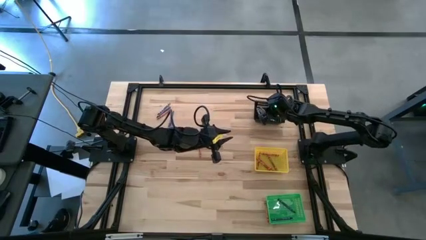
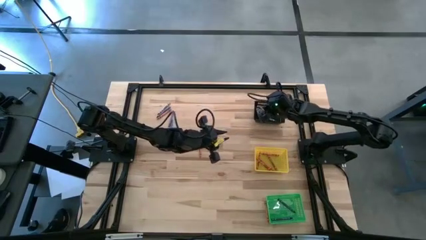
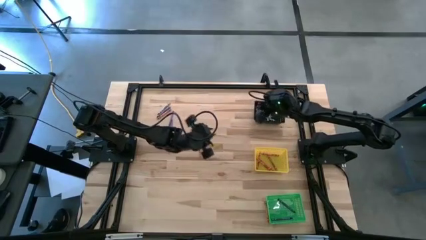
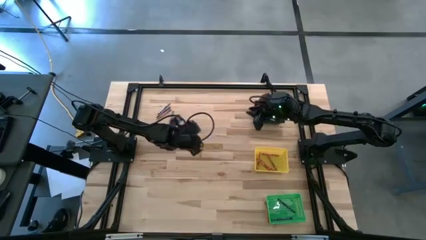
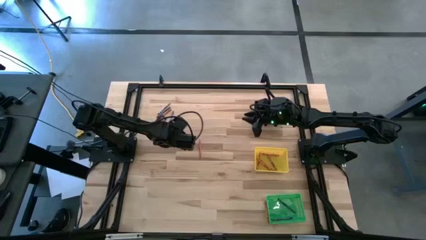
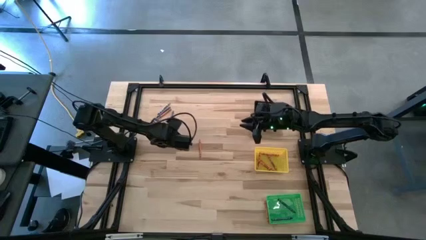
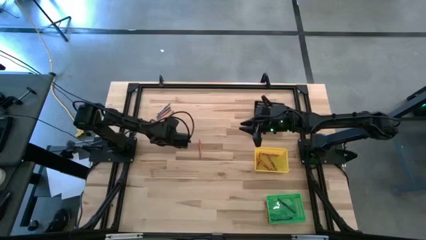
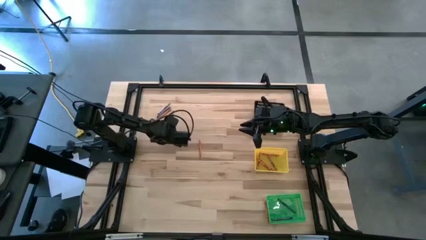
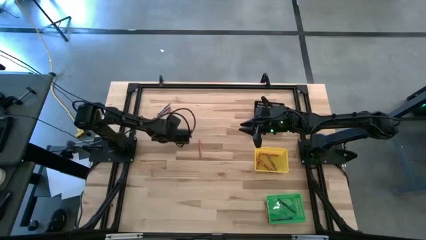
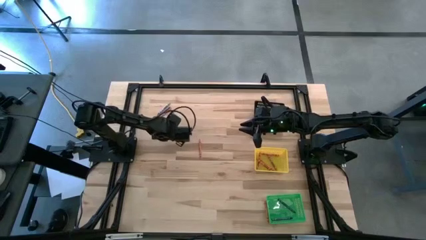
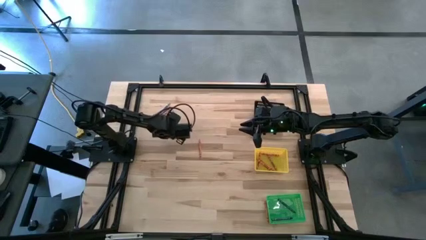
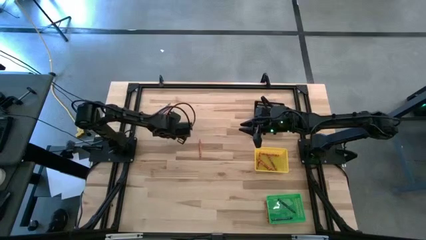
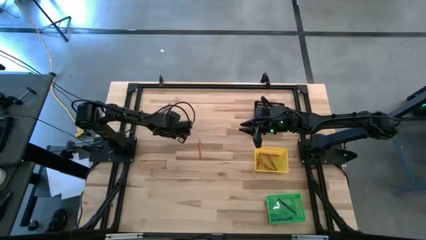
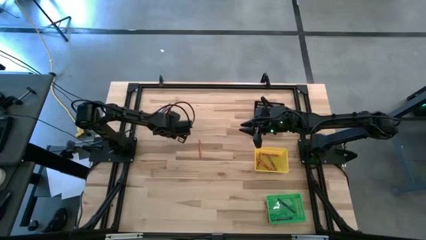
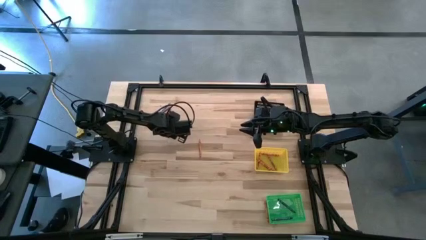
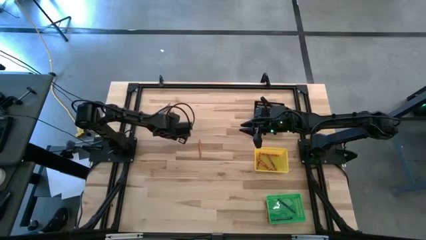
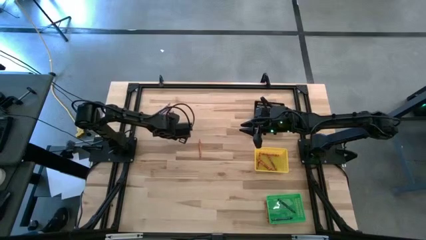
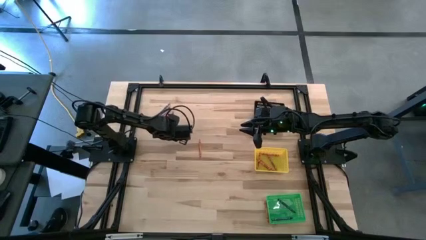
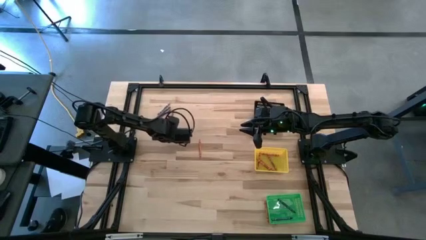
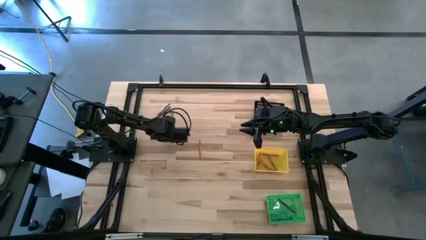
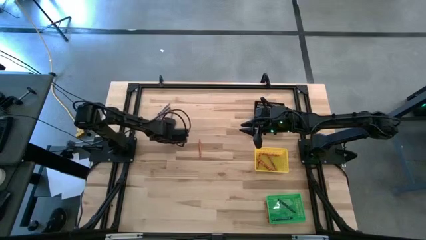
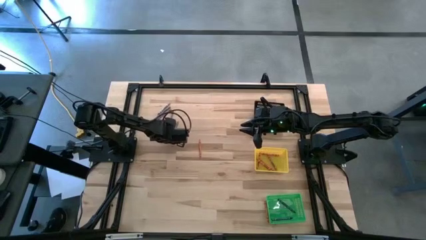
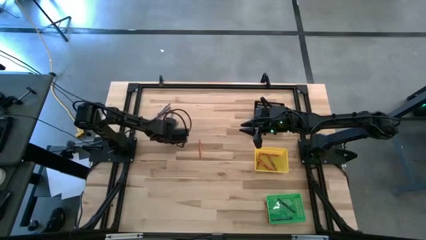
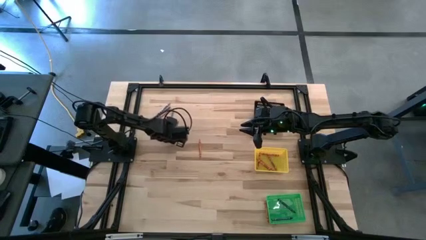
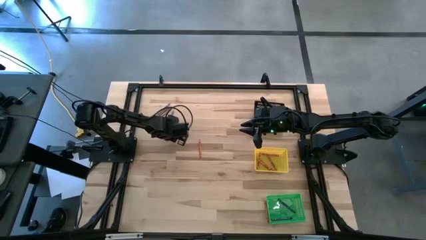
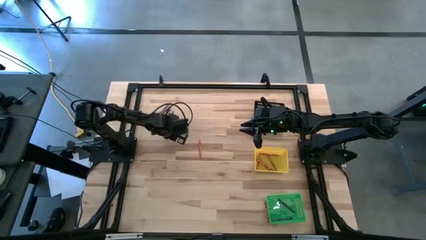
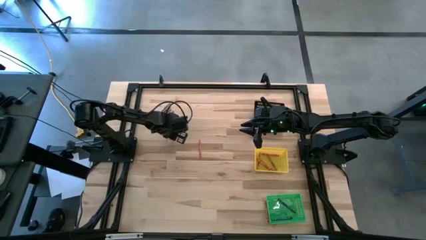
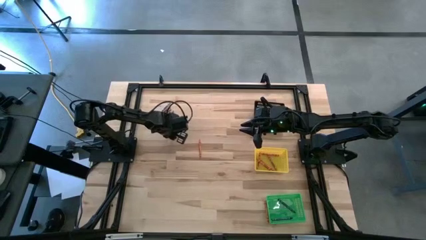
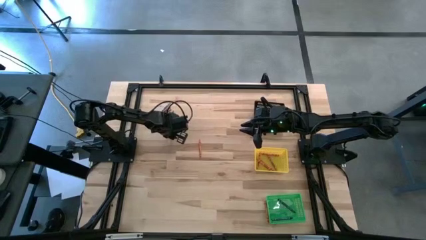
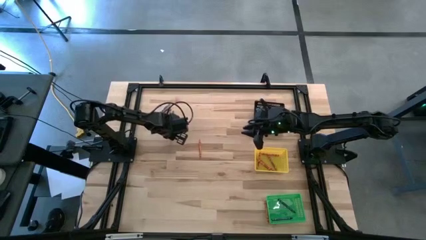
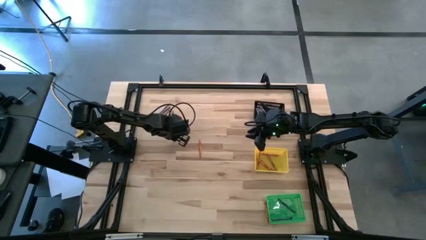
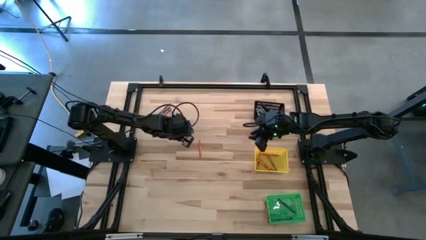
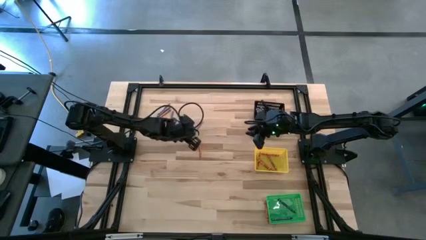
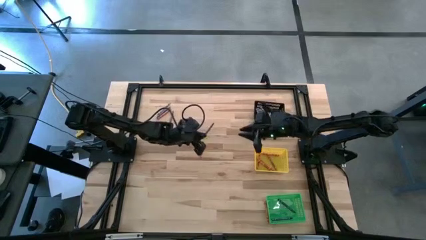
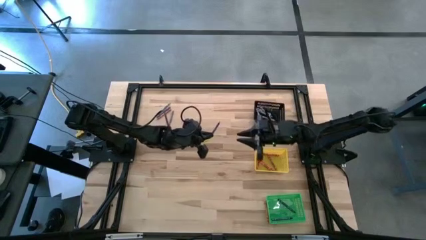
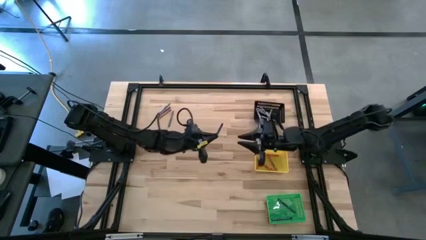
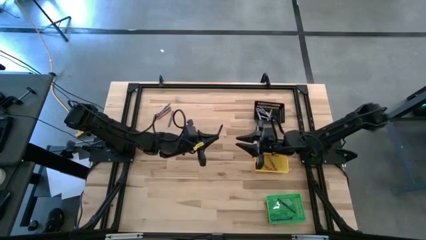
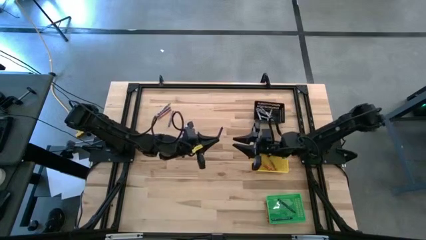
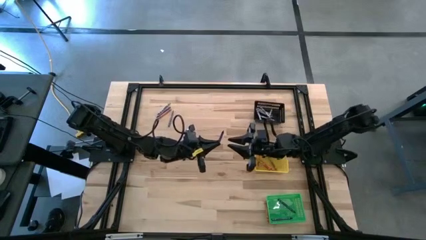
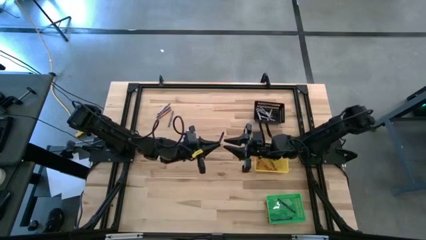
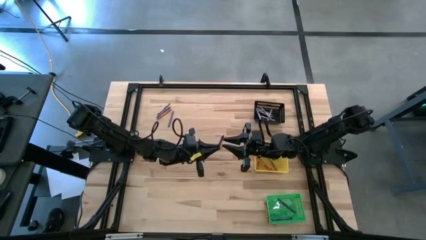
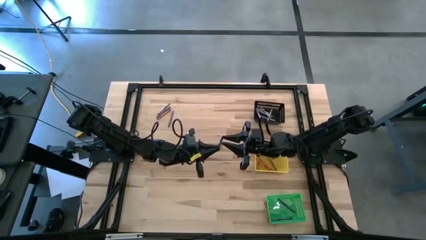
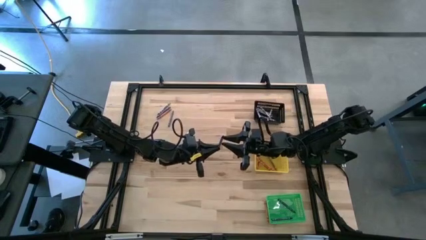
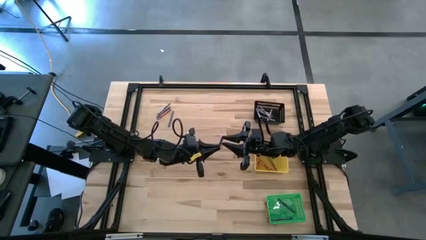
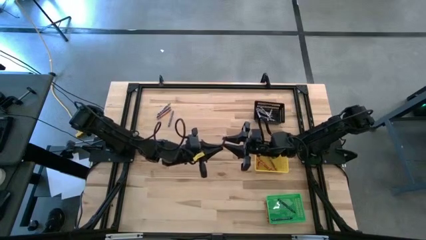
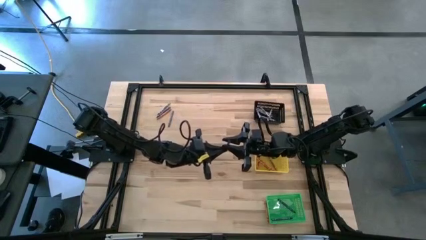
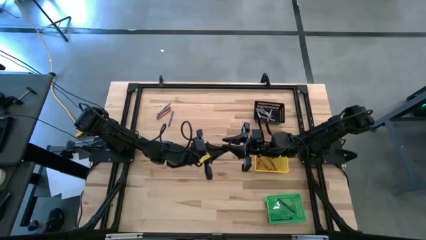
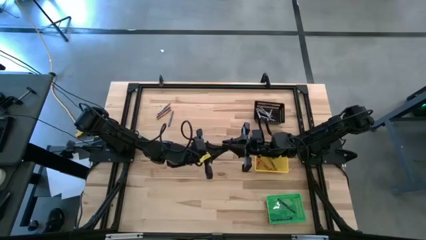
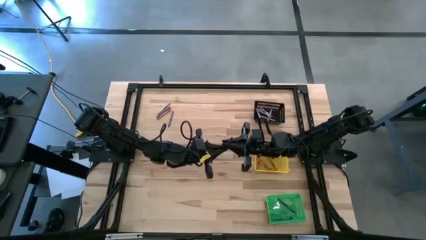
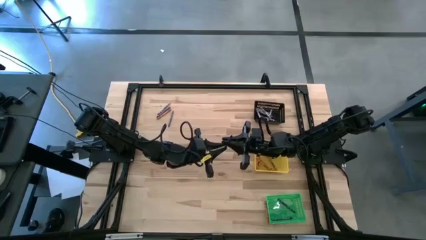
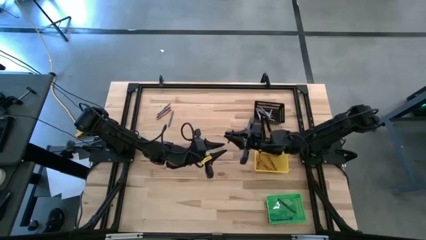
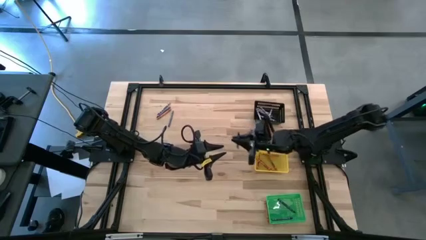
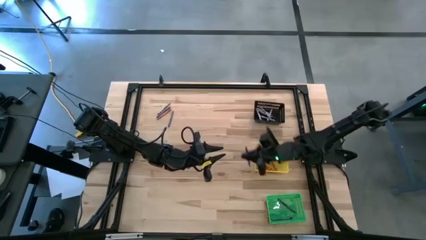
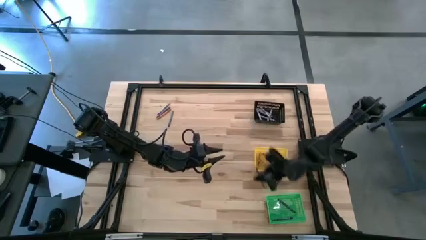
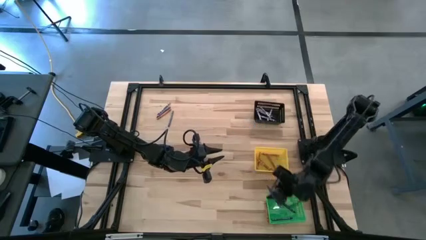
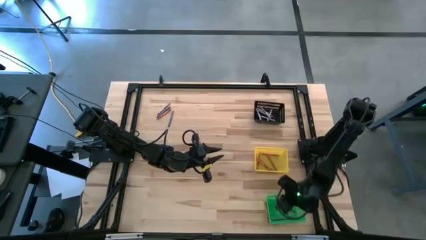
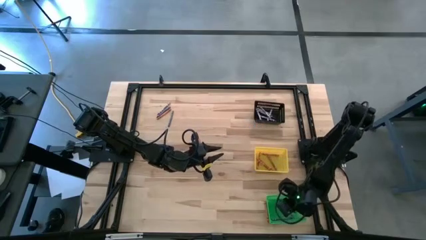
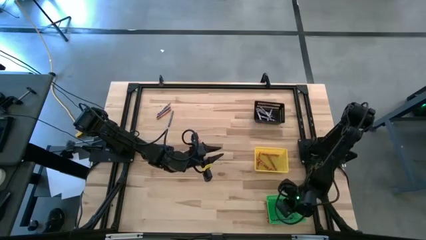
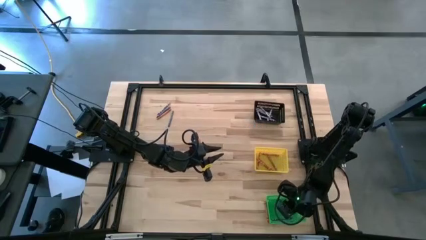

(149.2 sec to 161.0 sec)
Task: Sort crayons
Put the blue crayon into the green basket

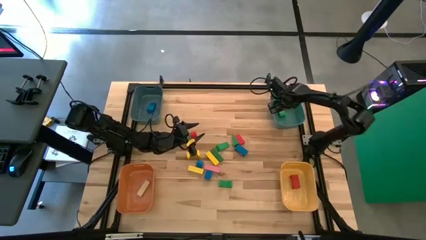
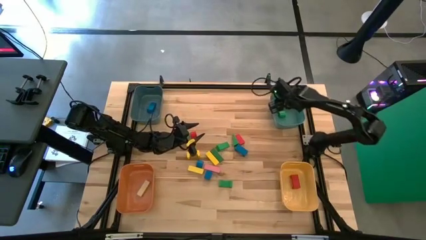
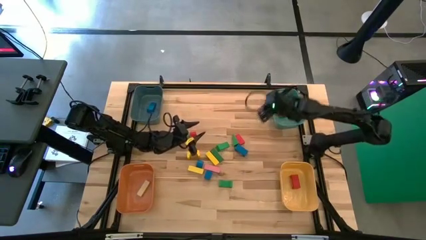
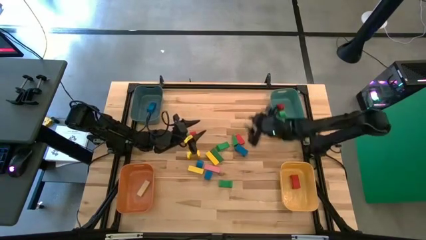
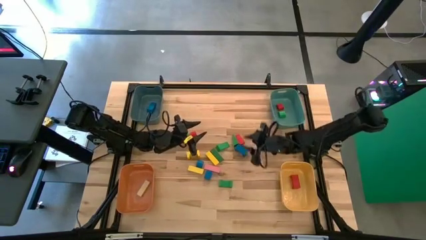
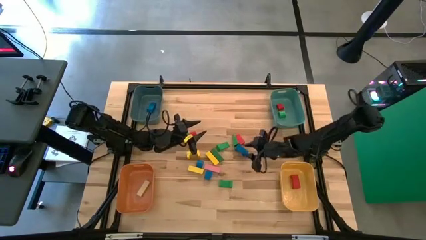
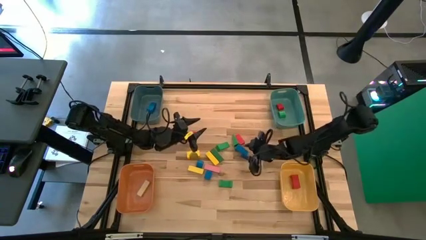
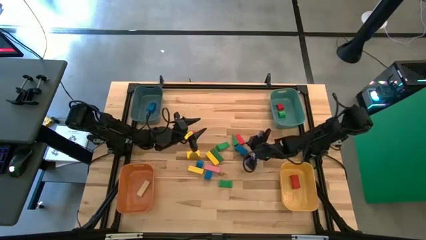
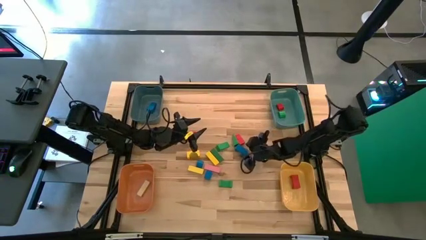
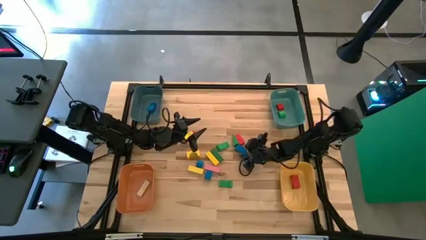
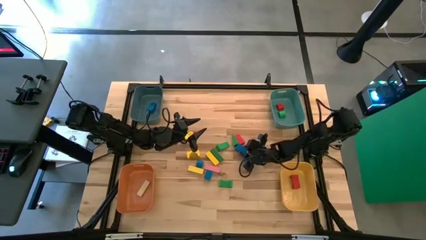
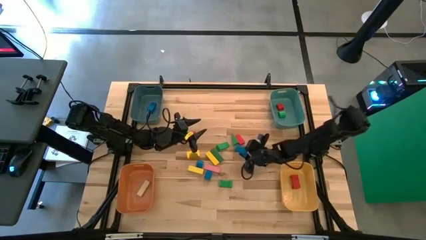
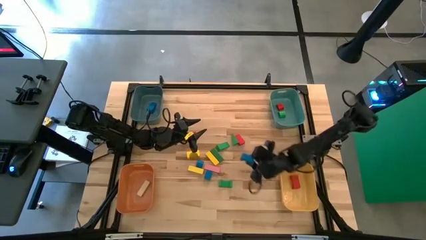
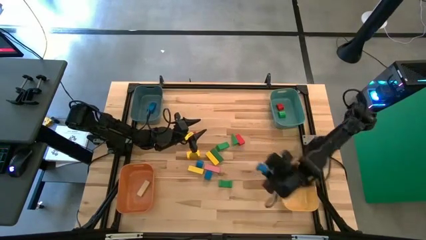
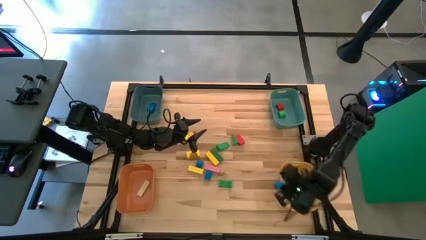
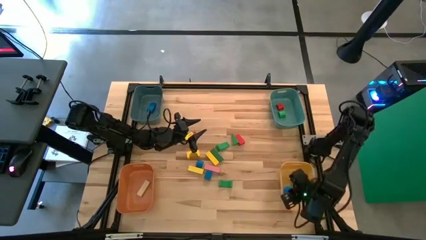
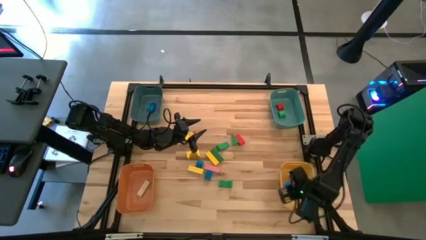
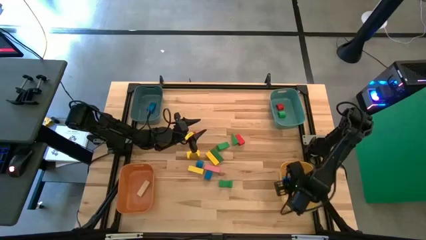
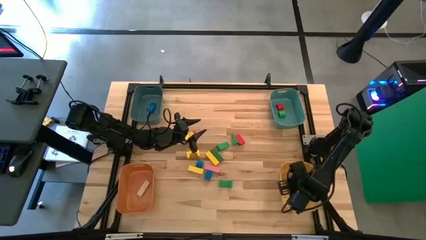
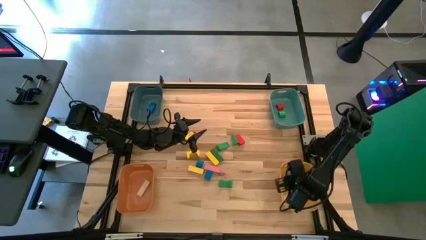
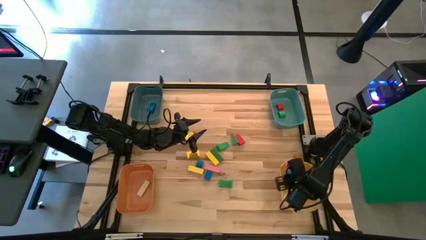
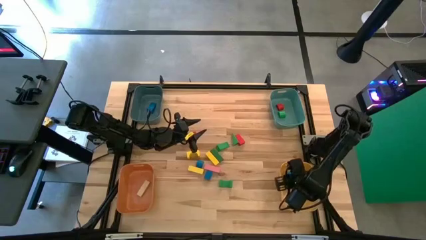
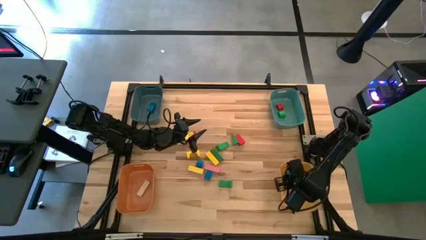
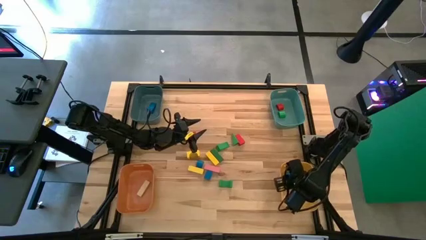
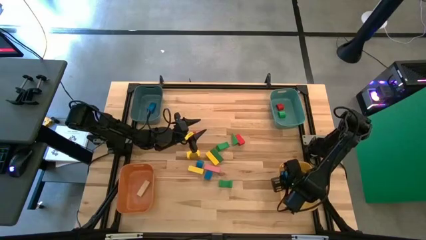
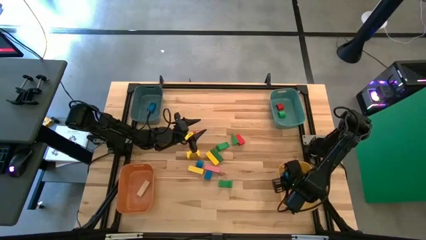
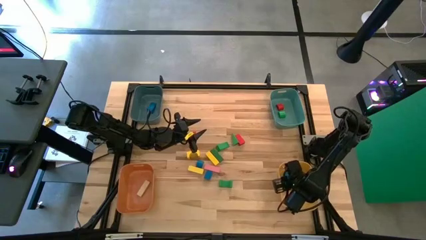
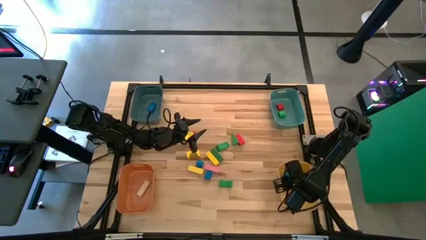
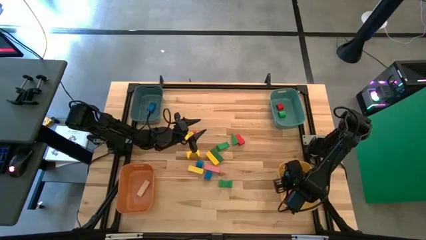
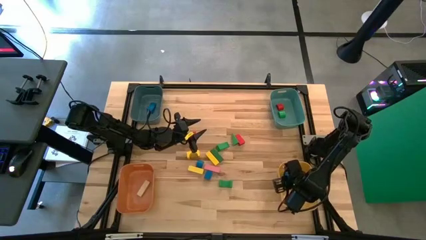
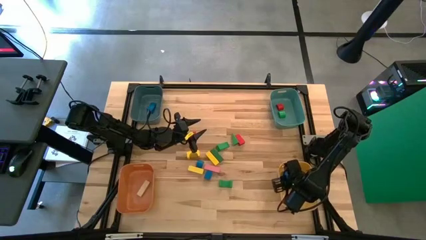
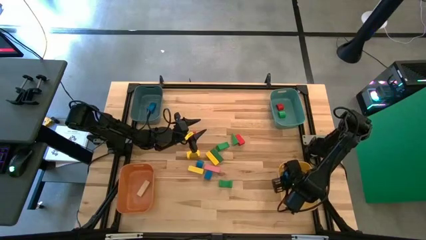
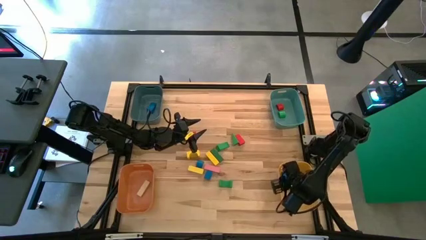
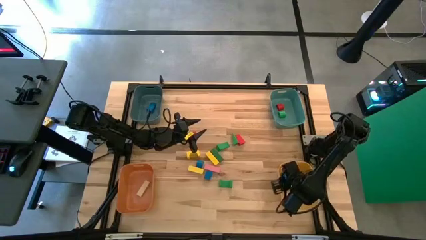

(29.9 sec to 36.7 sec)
Task: Sort blocks by size
Put the blue arch block into the yellow bin
